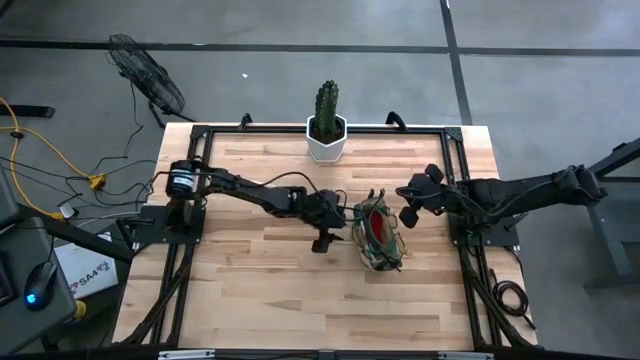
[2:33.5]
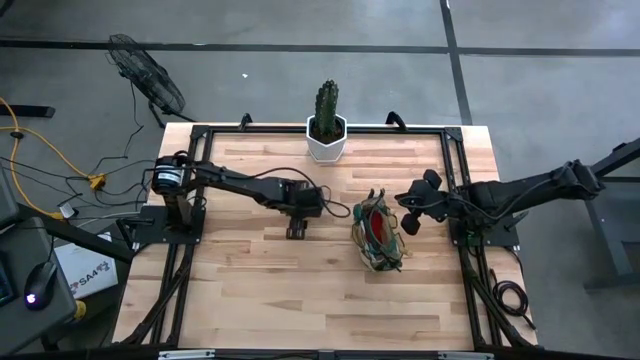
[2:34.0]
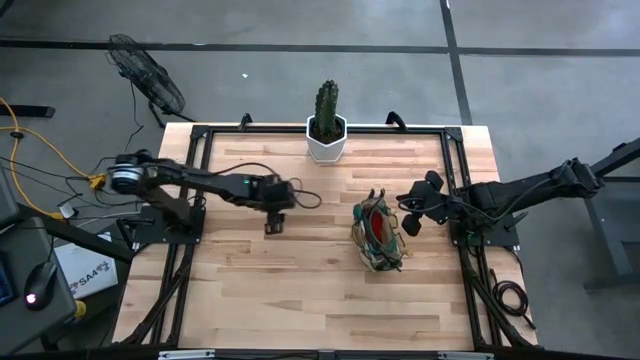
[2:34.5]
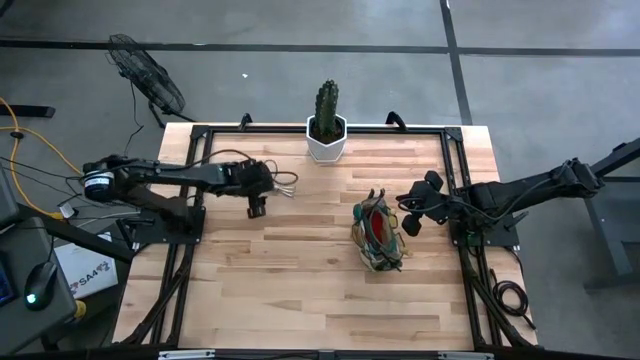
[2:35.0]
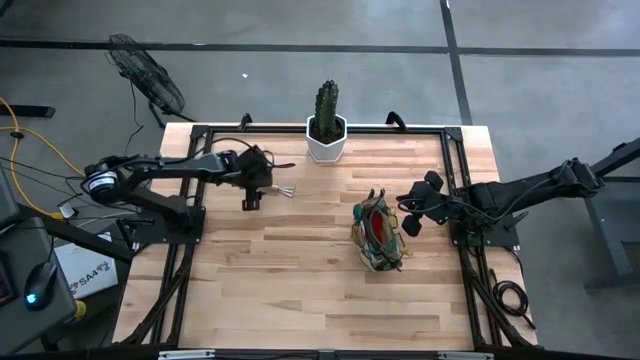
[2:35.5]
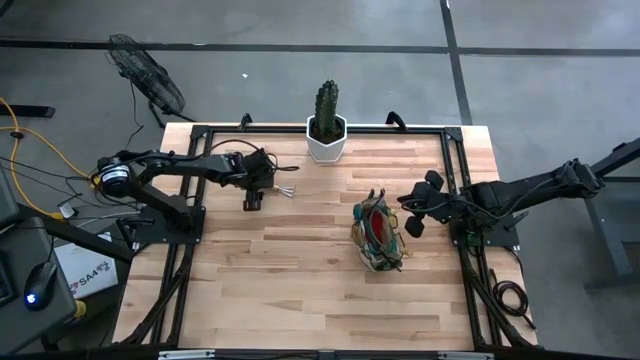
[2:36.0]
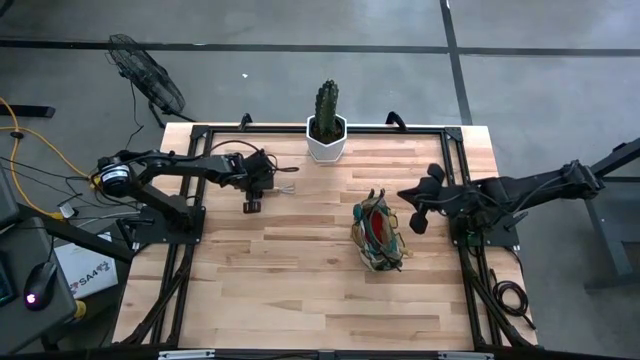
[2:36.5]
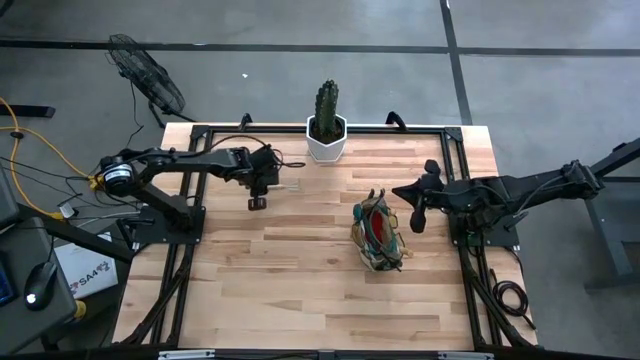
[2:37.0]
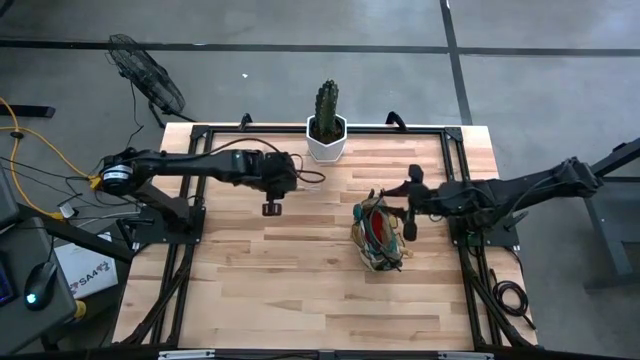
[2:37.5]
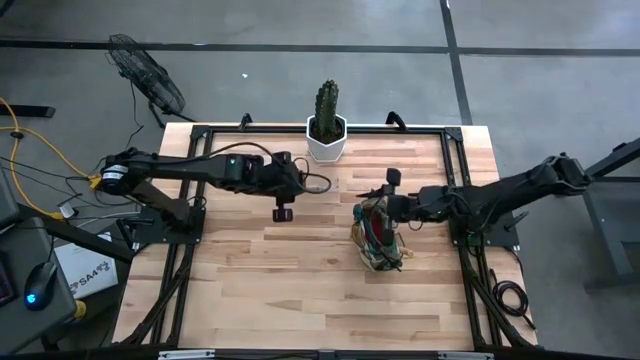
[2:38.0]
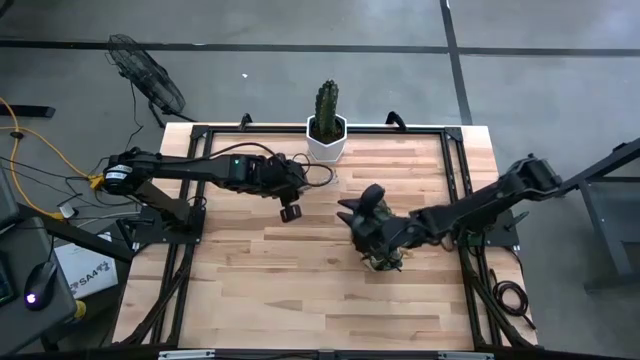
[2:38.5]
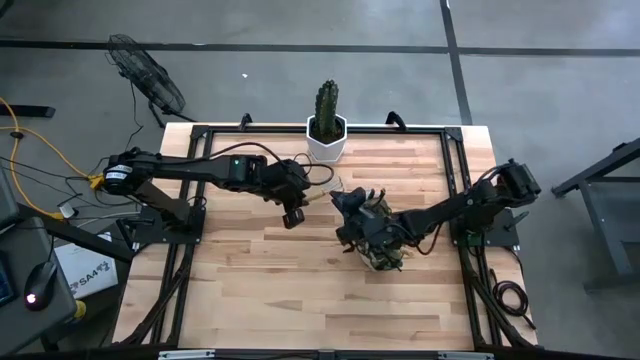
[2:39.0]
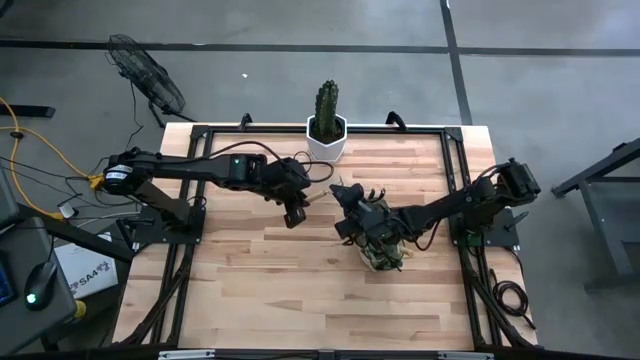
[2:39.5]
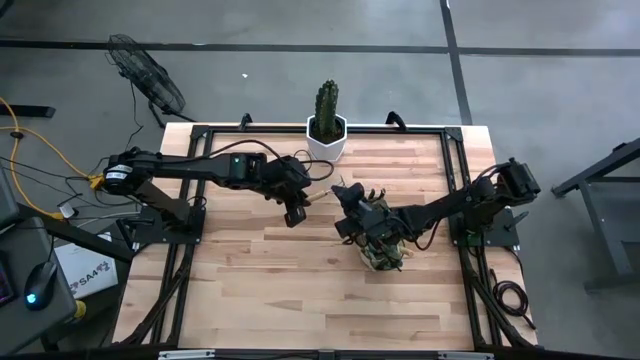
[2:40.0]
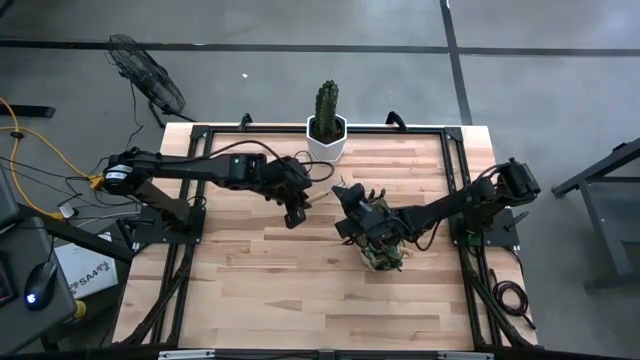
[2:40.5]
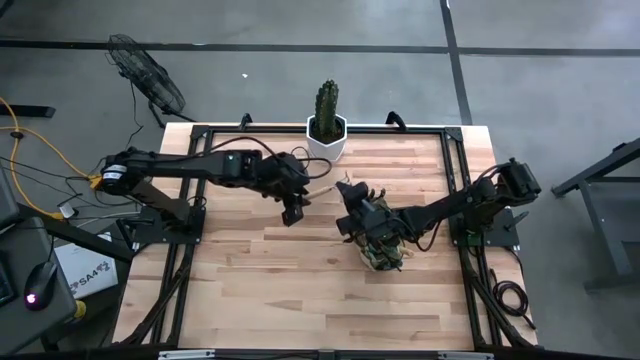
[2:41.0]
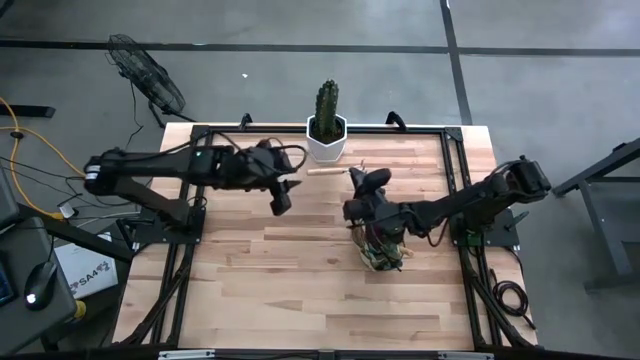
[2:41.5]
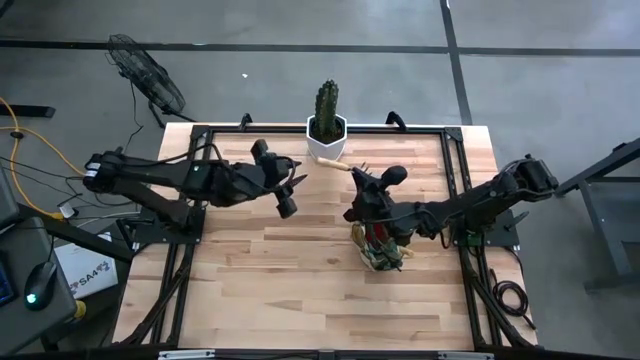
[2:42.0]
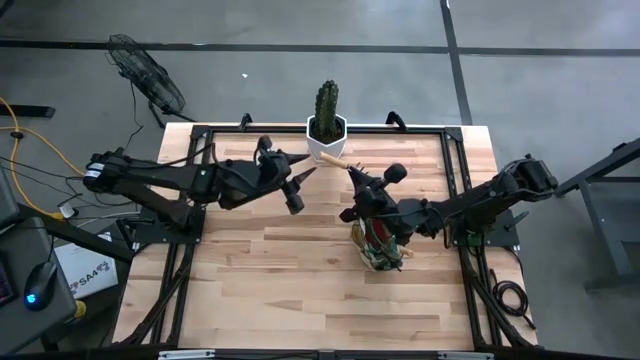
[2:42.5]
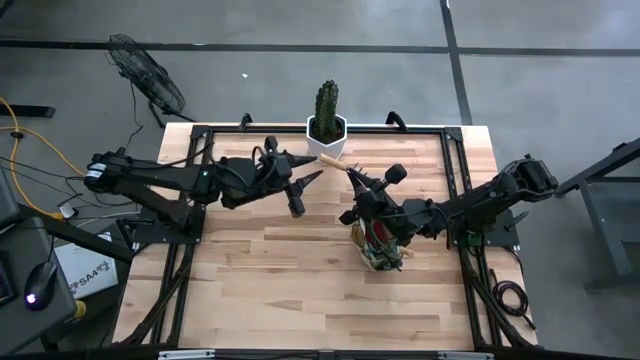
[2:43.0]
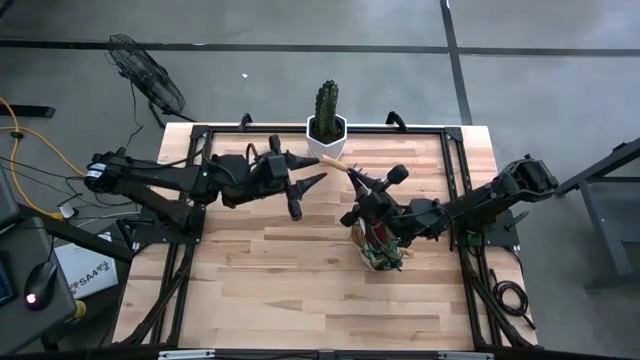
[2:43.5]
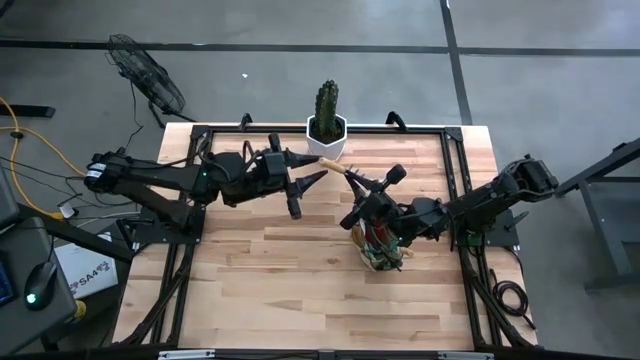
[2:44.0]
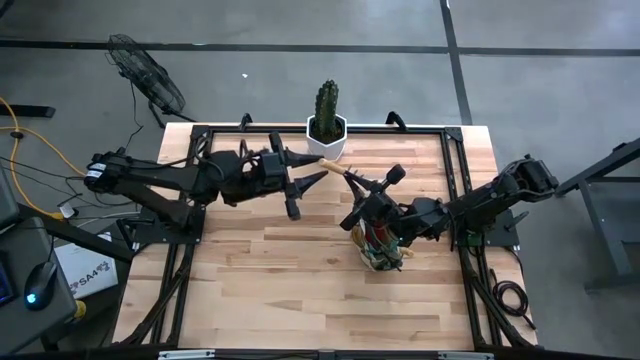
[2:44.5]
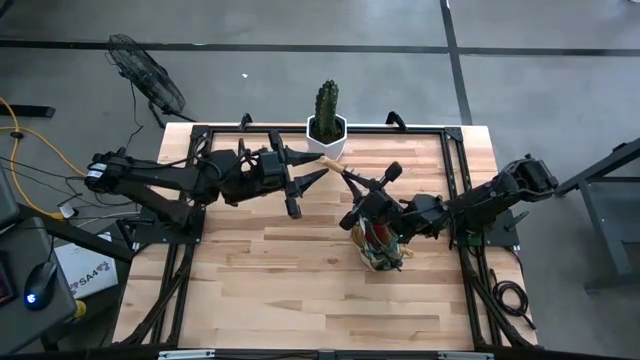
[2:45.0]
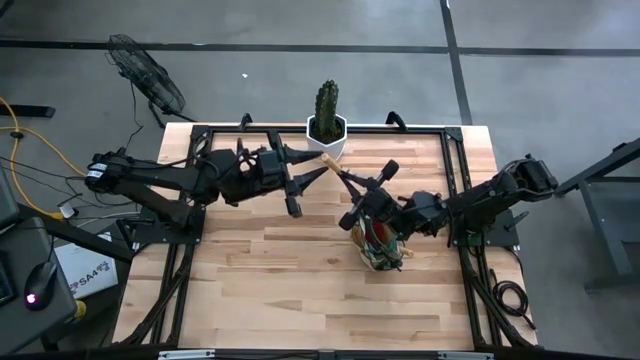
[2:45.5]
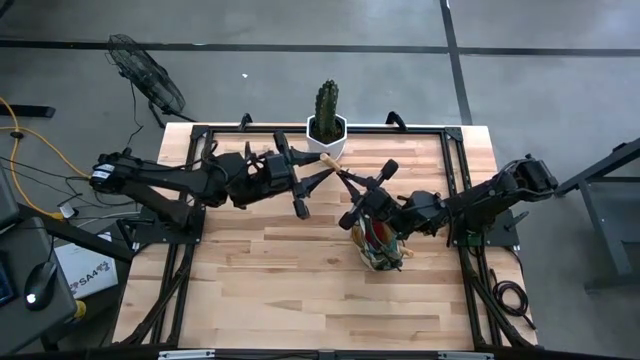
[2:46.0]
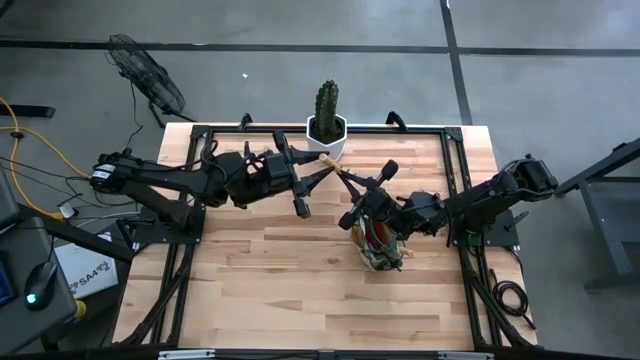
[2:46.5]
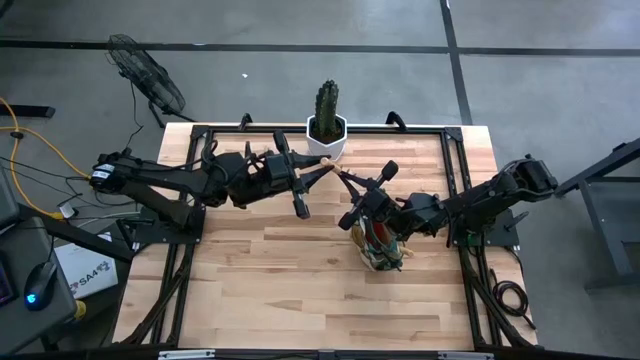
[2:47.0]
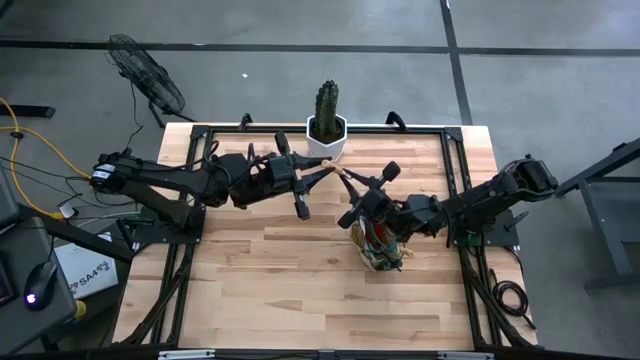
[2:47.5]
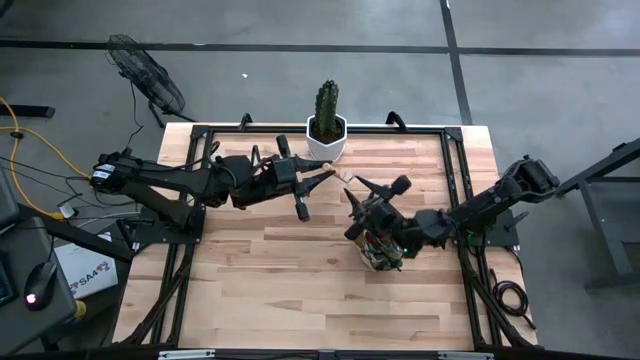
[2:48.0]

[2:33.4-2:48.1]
Task: Pick & Place Garden tools in Gardening bag
Put the brown hand rake into the brown gardening bag

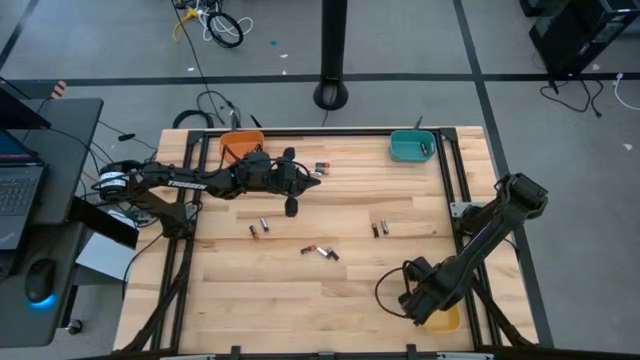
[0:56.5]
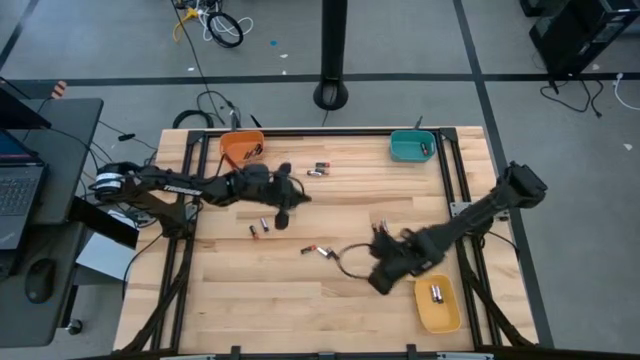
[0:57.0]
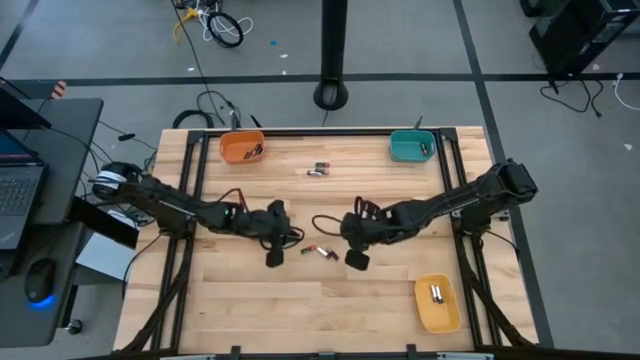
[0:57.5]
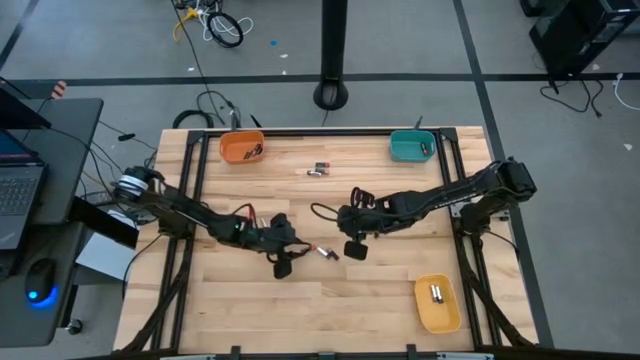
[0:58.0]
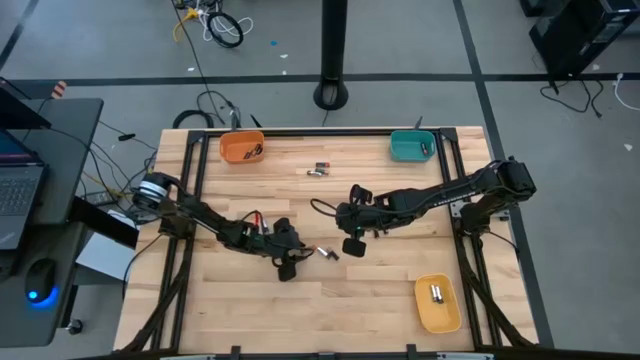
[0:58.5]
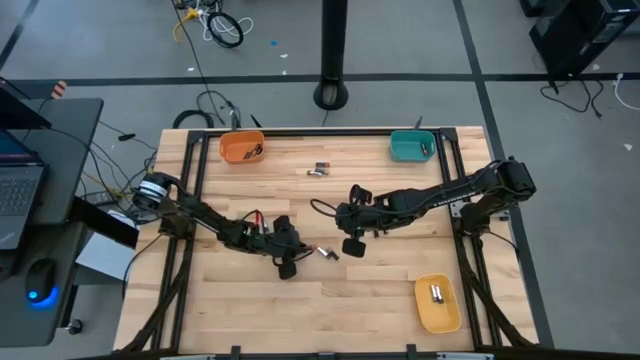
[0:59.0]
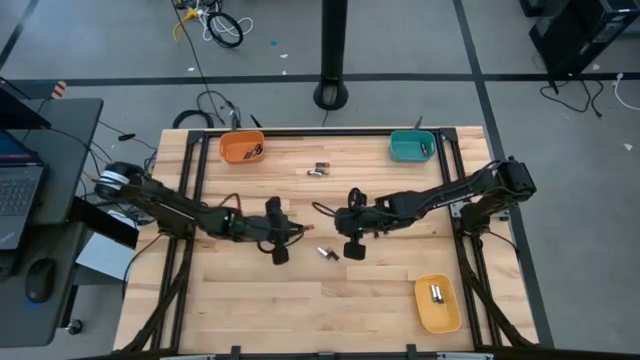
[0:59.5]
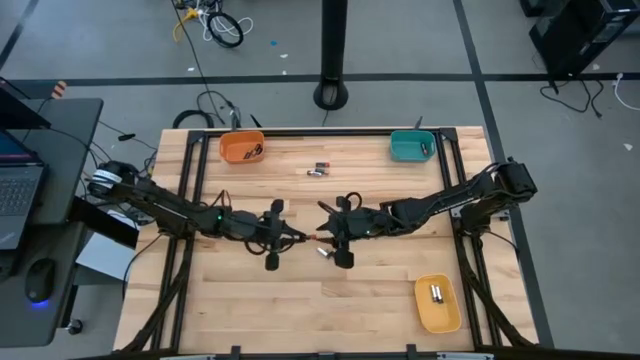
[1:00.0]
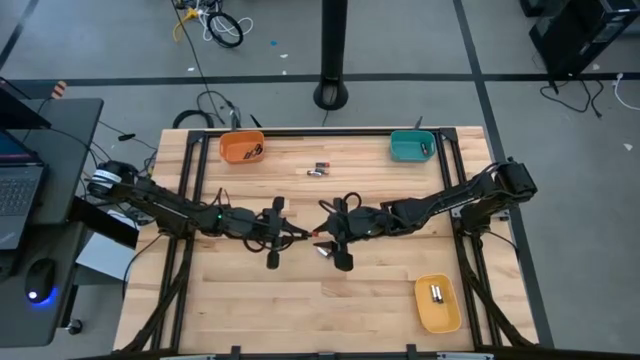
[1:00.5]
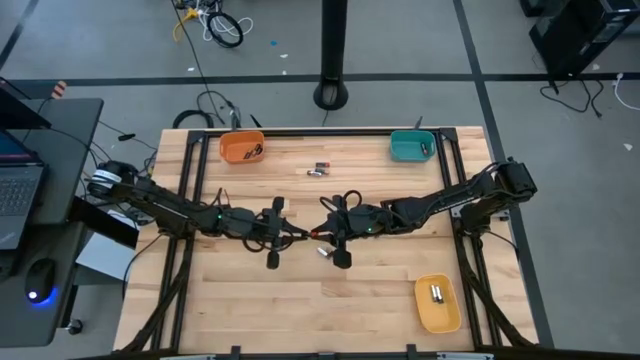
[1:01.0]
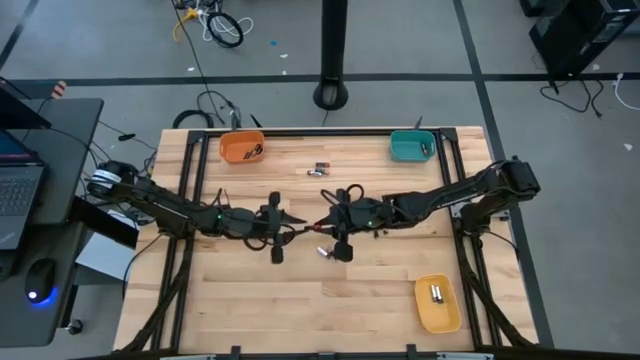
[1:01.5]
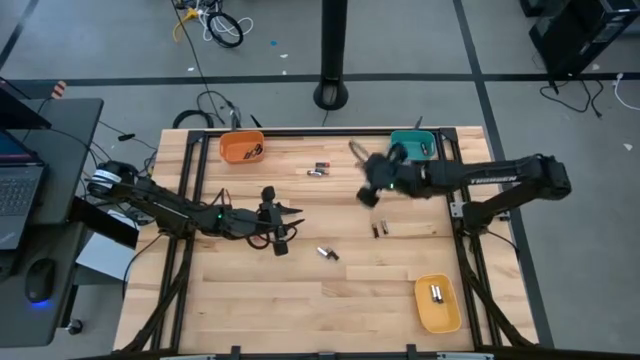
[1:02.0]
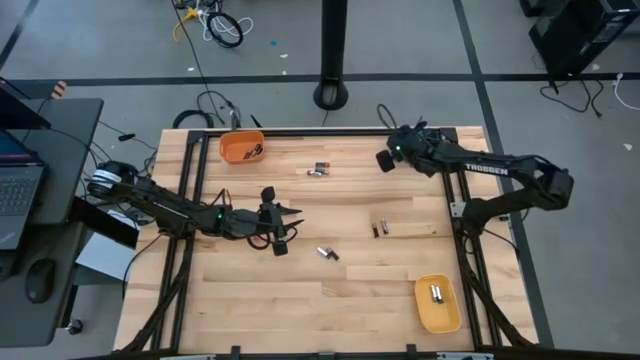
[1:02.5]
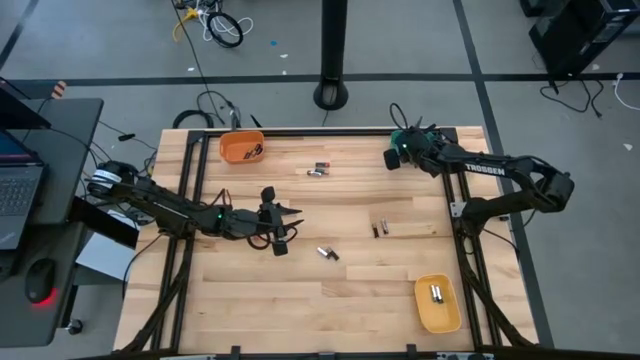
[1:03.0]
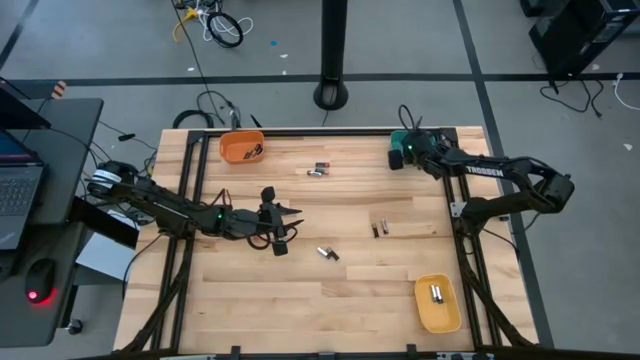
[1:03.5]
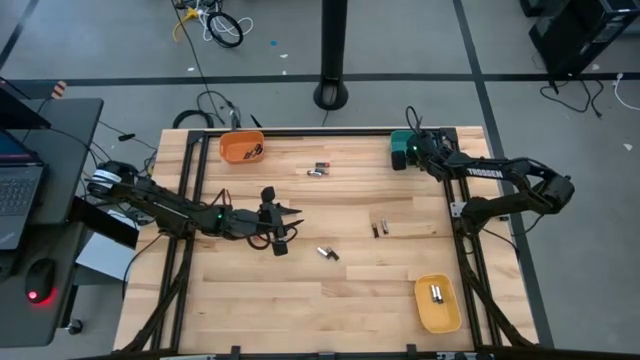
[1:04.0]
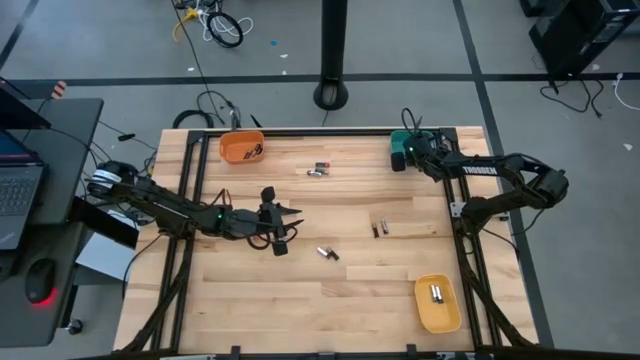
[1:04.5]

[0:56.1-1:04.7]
Task: Sort batteries
Put the black-red battery into the blue bin
